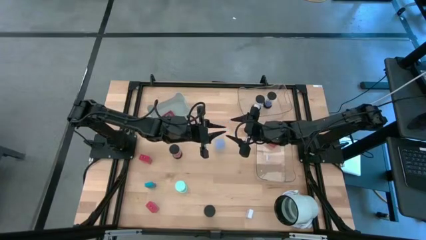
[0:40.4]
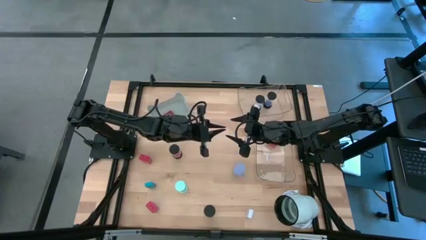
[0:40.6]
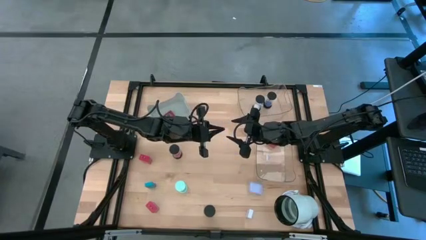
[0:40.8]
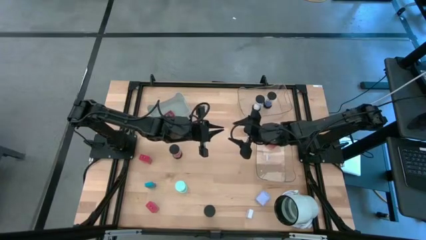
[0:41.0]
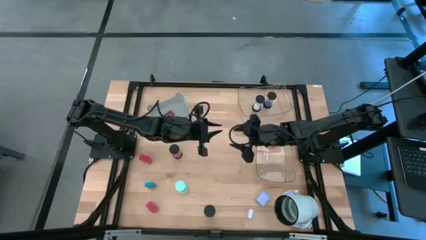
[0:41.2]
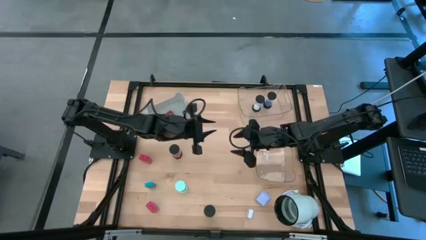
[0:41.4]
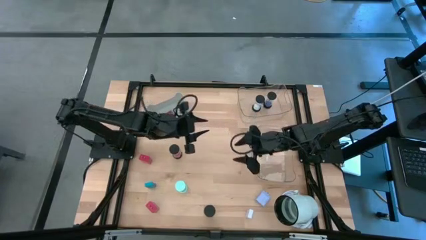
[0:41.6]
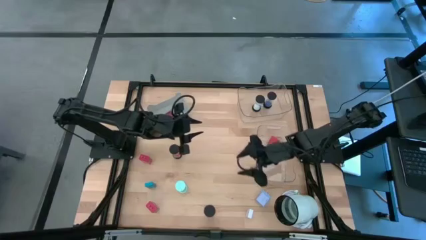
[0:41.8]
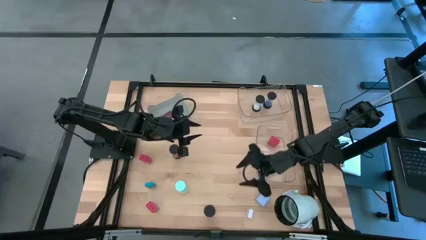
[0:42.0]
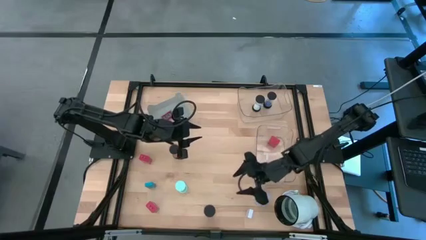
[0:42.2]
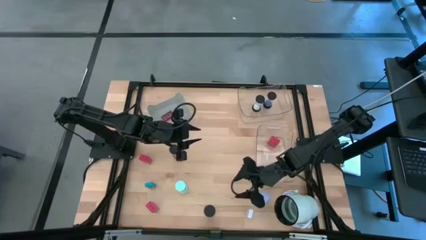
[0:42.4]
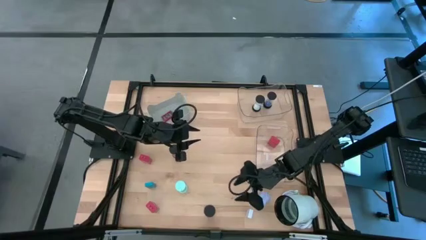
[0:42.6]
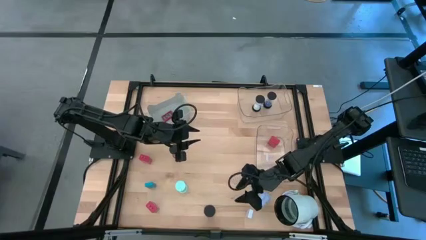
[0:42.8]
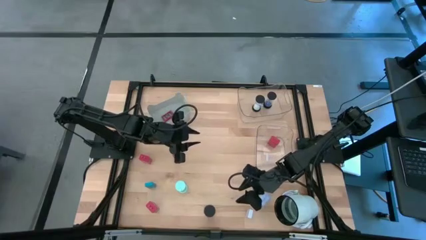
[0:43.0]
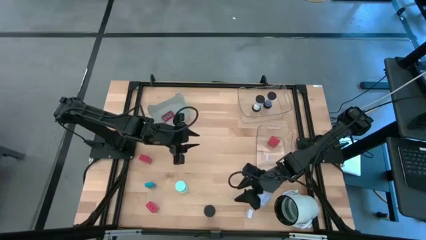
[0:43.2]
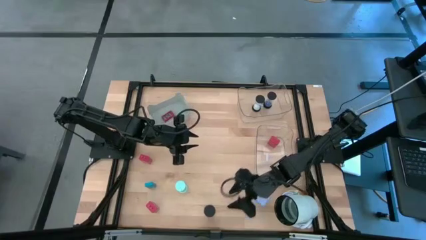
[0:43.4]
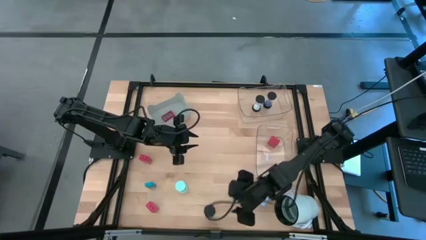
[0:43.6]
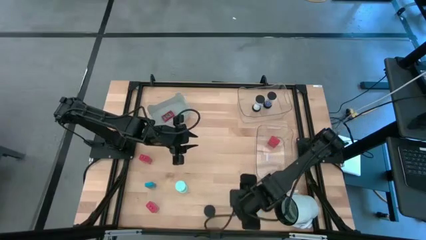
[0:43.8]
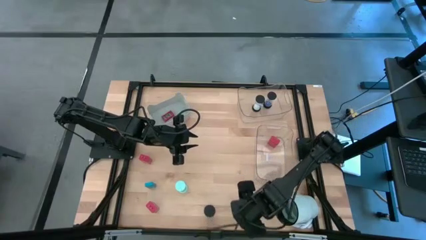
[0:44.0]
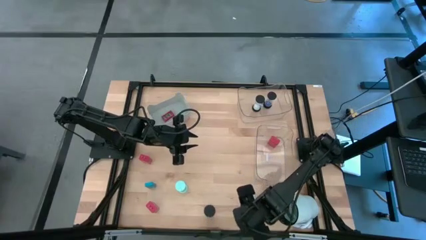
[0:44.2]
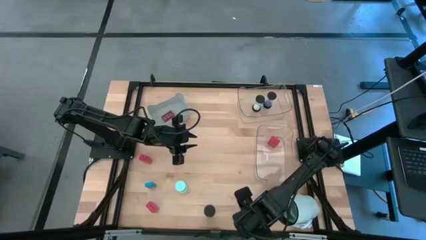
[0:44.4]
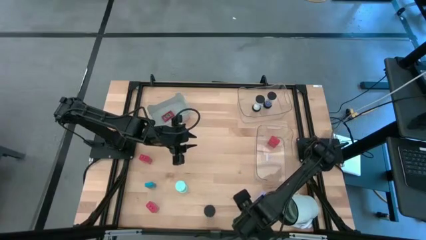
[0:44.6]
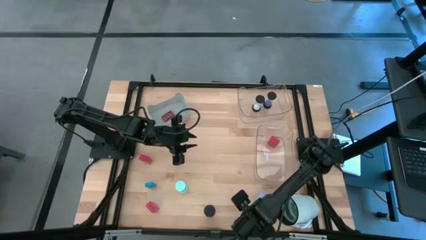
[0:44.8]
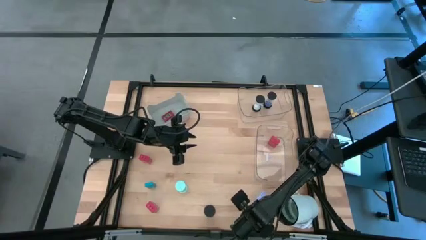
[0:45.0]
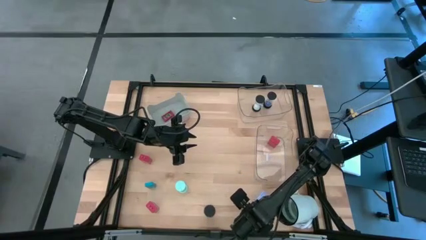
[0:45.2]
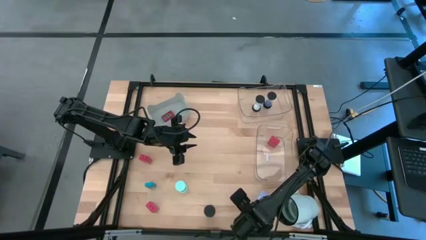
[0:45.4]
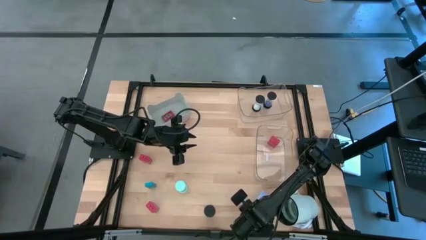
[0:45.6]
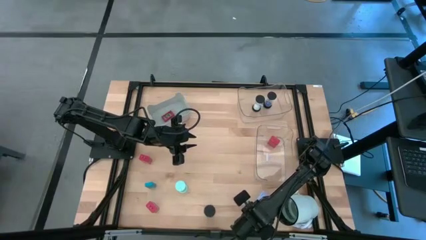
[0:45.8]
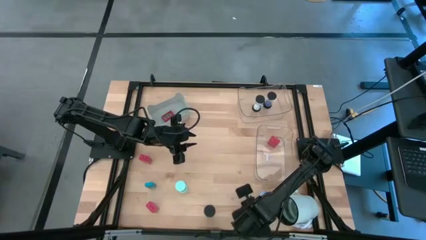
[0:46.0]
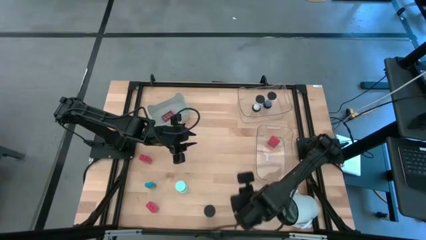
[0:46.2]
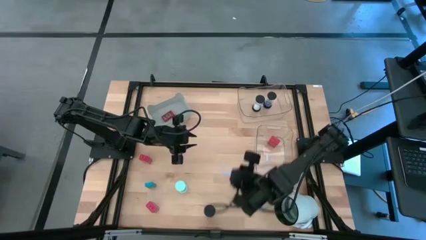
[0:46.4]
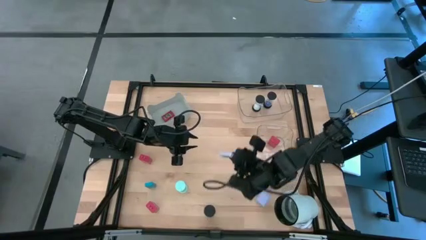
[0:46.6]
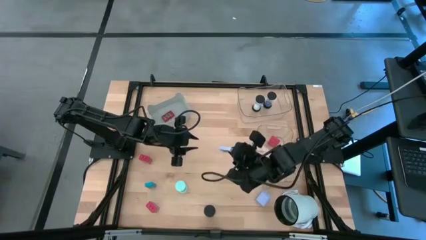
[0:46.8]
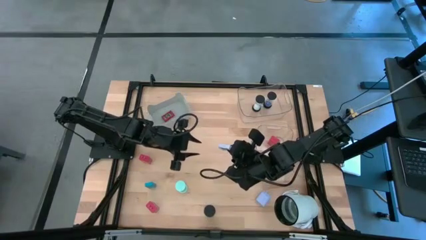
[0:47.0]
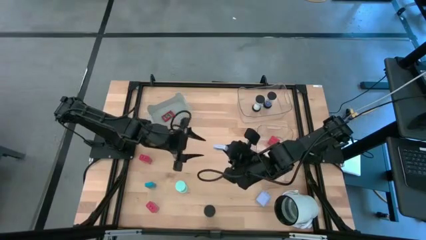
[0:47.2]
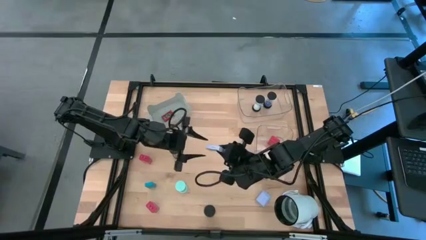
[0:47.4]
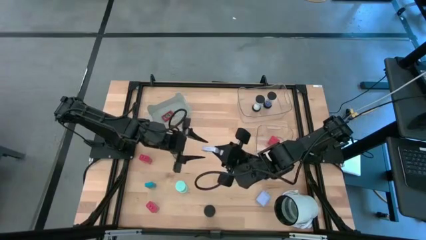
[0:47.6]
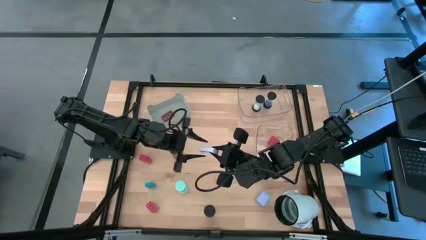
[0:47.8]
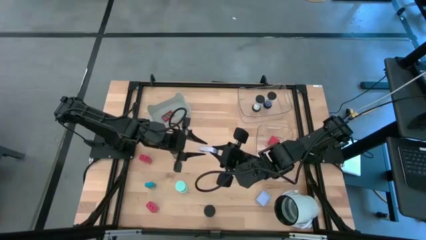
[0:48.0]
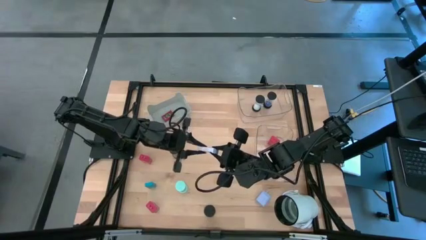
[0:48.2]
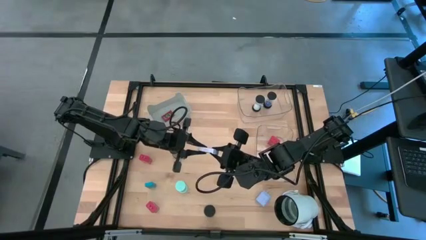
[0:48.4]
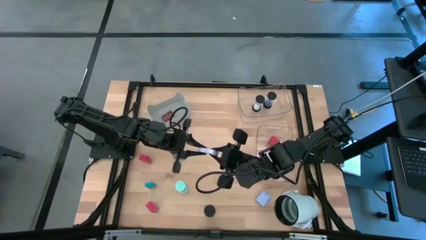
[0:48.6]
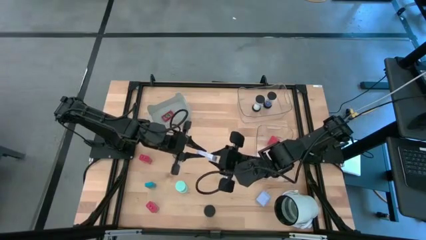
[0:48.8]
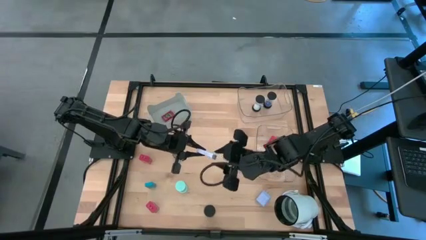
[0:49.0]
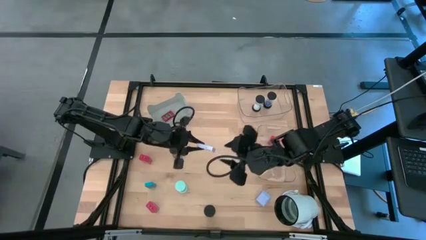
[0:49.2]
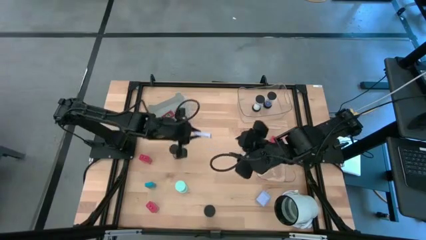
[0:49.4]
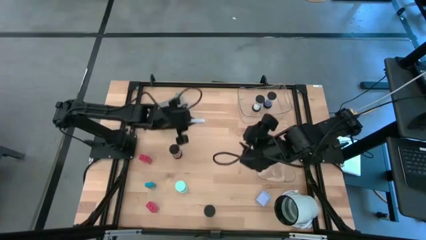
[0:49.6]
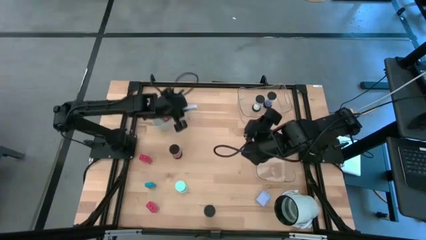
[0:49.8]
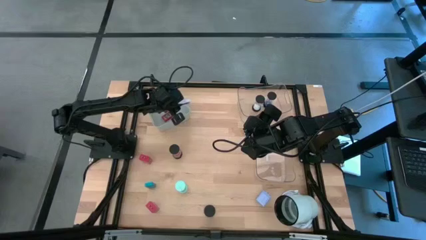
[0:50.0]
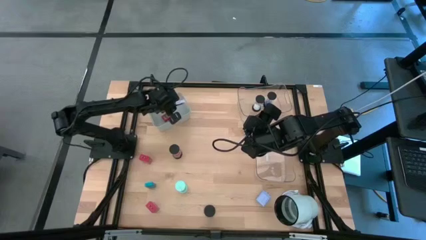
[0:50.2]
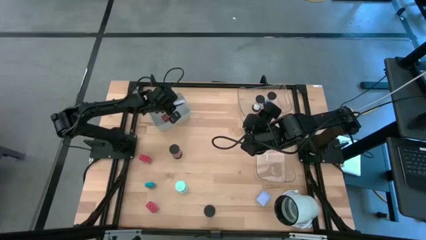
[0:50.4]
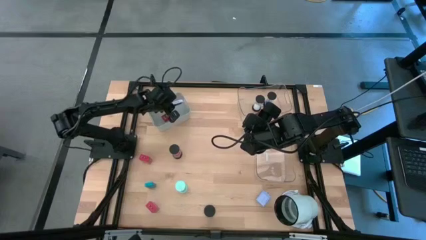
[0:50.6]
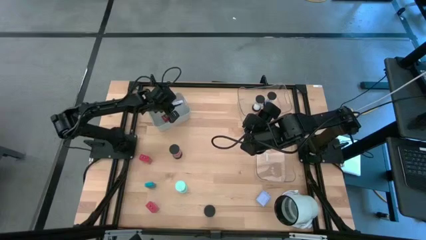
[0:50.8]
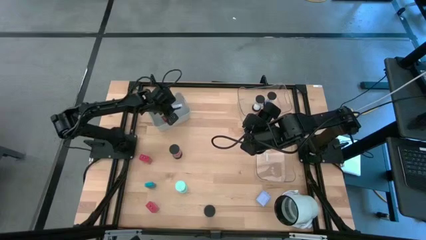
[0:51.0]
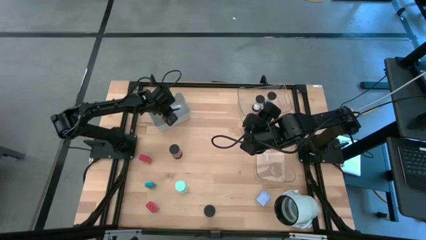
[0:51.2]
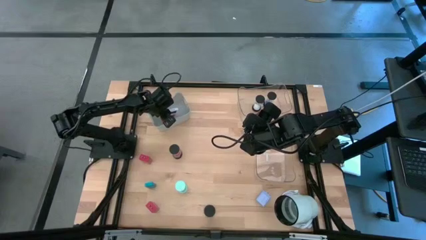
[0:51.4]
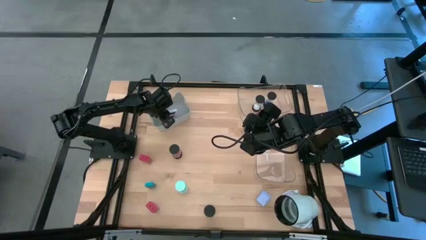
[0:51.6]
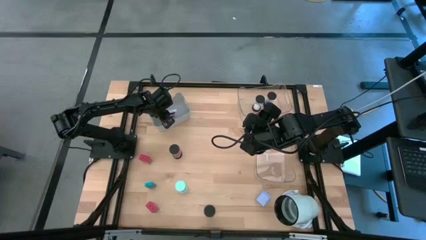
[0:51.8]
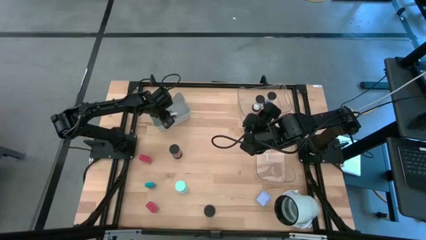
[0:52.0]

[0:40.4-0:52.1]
Task: Pick & Place Office items
Put the white digital clock into the gray bin
